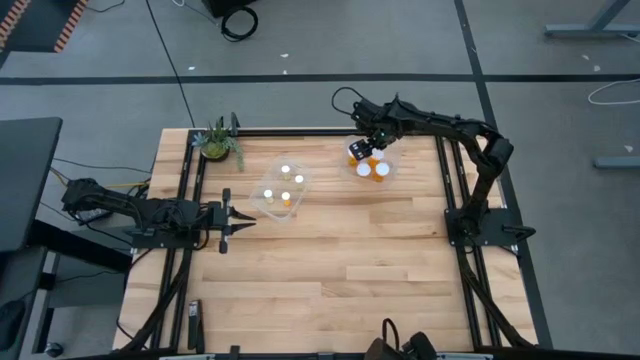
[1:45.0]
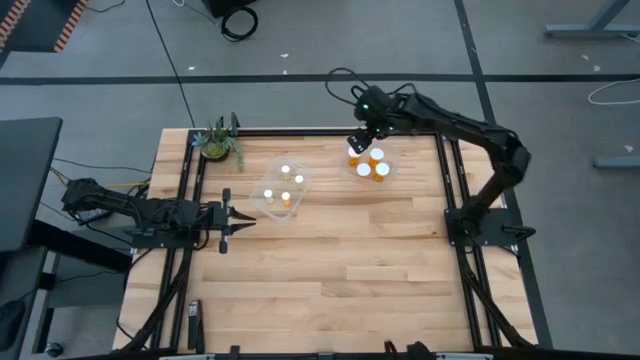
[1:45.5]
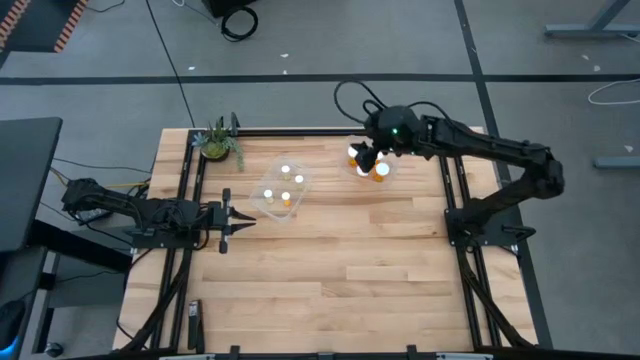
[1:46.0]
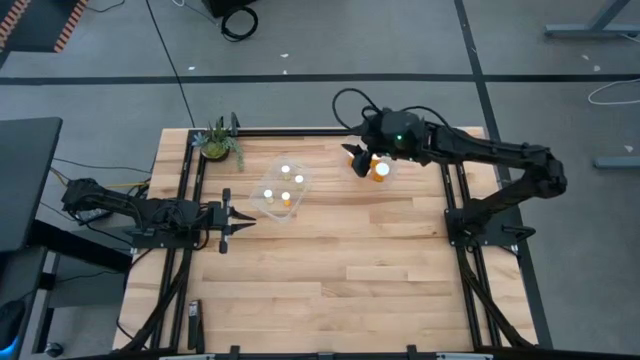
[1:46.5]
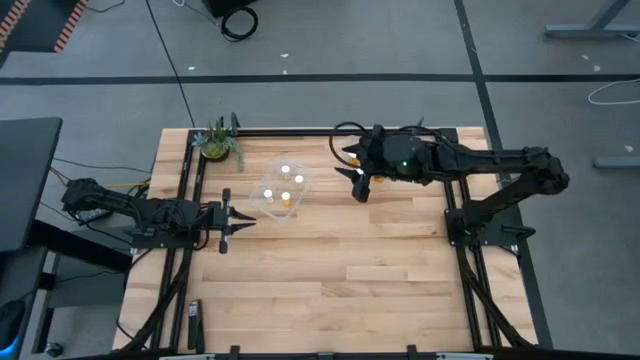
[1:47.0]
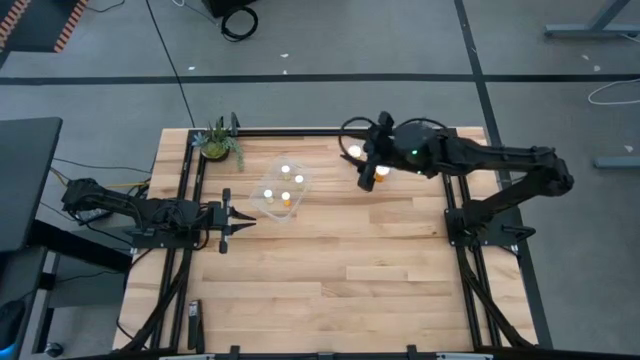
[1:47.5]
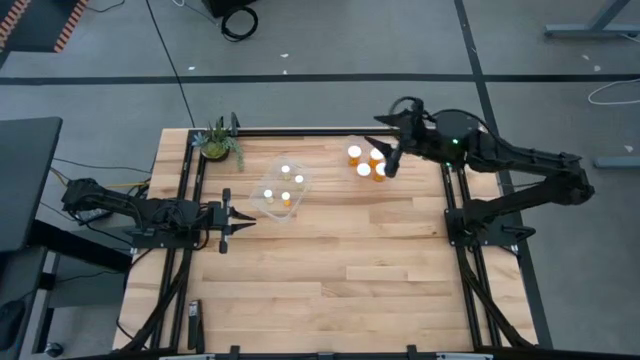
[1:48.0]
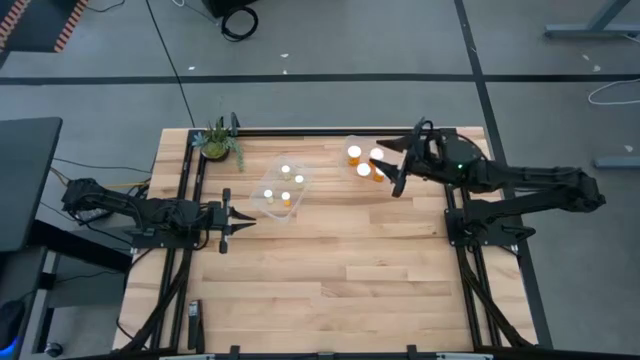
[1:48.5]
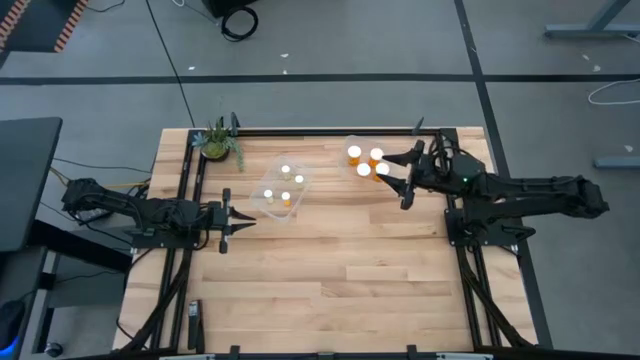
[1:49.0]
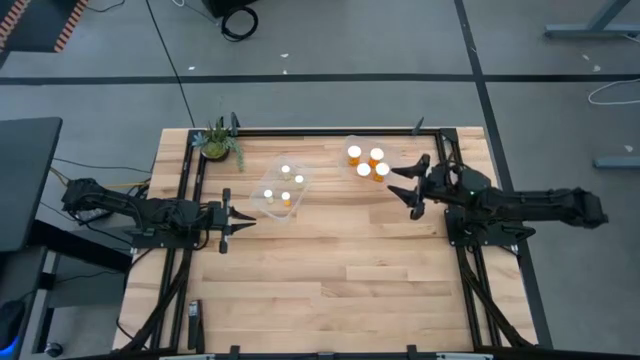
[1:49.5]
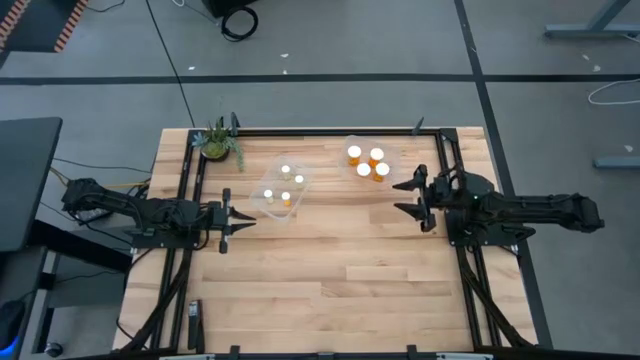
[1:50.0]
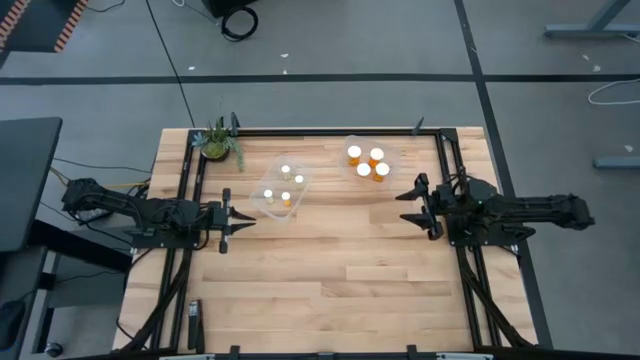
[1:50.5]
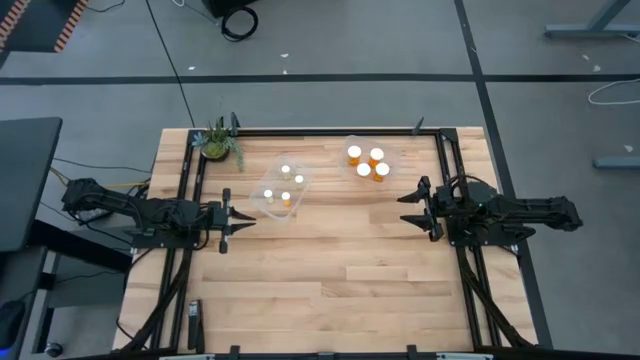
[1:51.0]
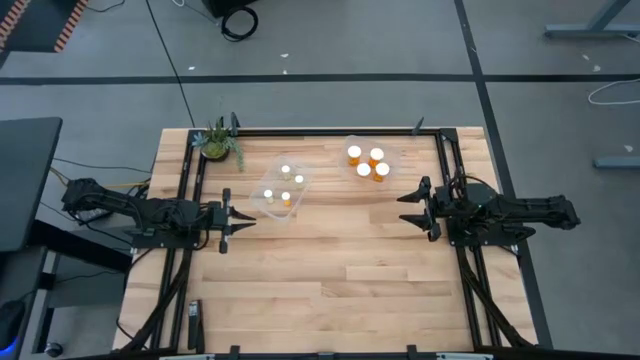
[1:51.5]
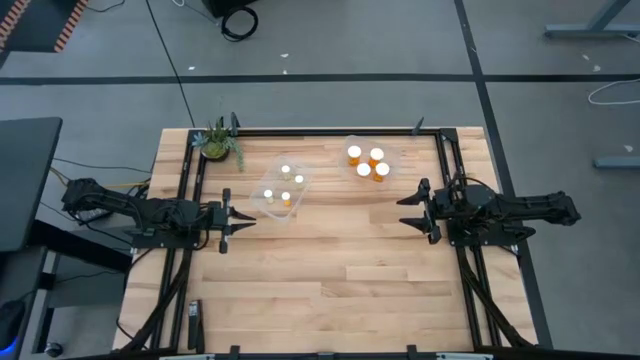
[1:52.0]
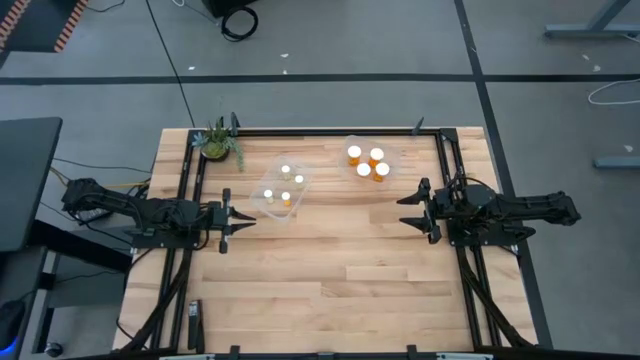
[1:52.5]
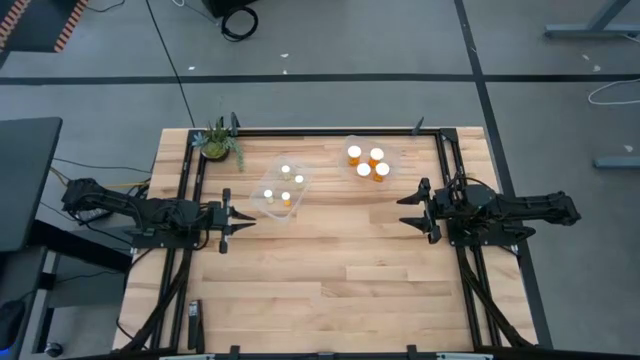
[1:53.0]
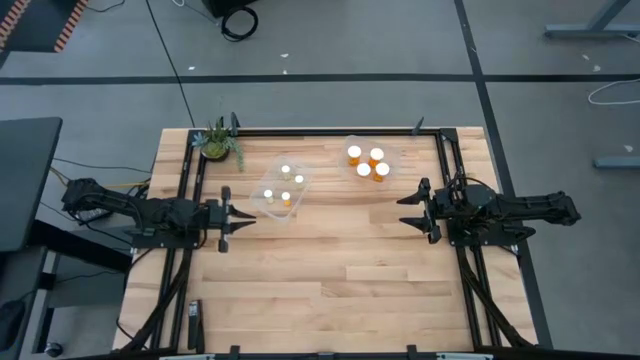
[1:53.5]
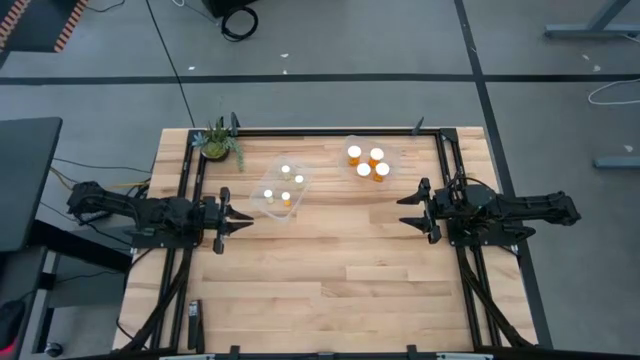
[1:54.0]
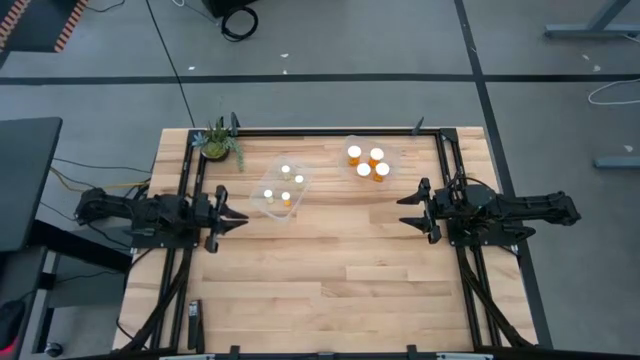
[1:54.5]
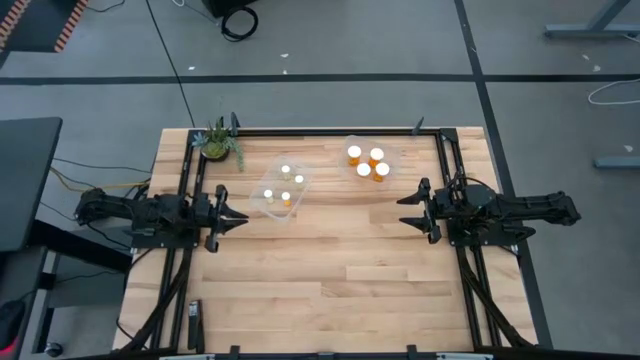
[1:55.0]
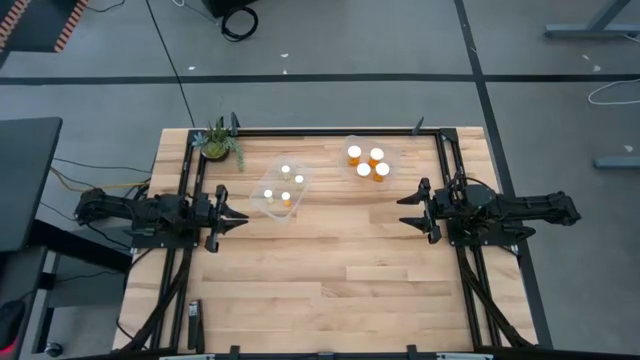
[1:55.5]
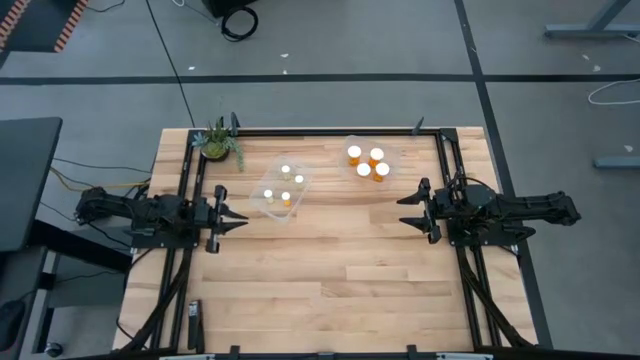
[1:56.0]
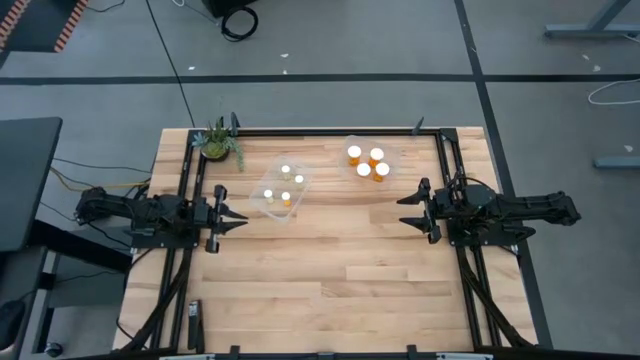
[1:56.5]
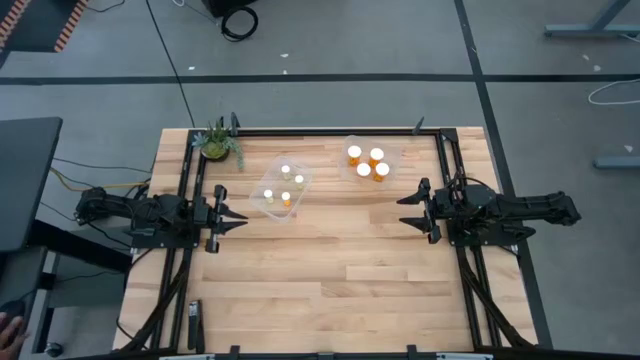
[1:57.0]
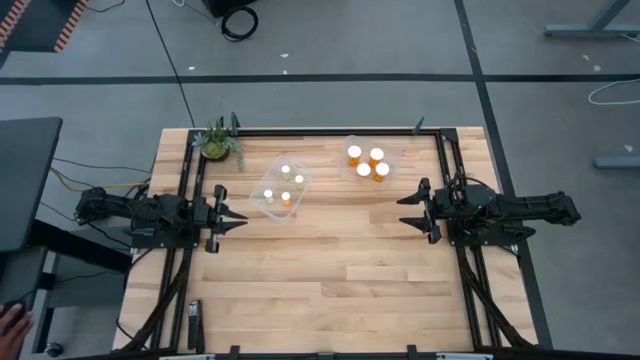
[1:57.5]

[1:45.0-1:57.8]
Task: Pick and place medicine bottles into bin by pill shape (circle, oval)
Return to Home Position

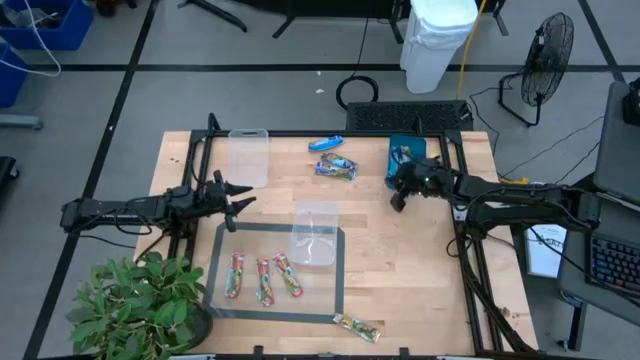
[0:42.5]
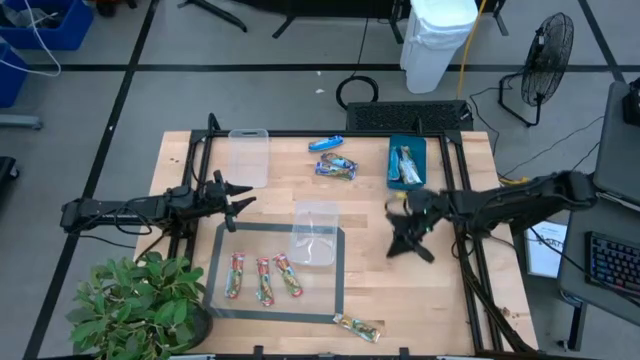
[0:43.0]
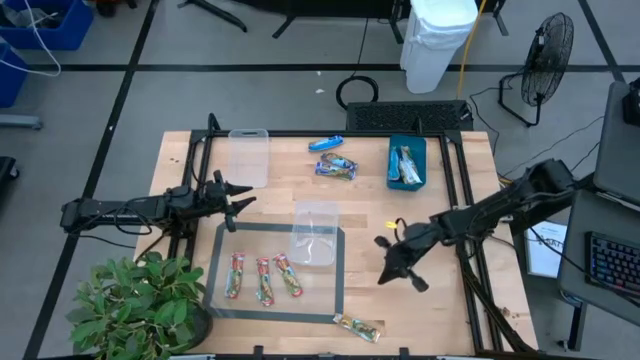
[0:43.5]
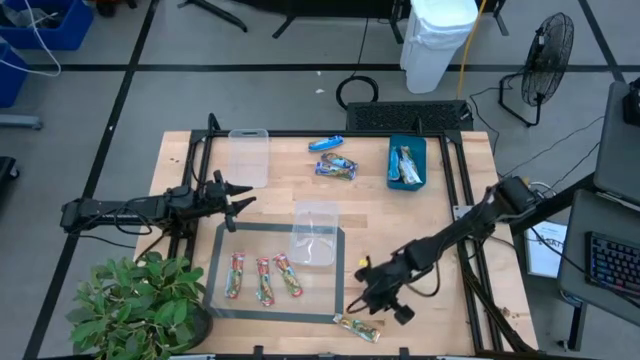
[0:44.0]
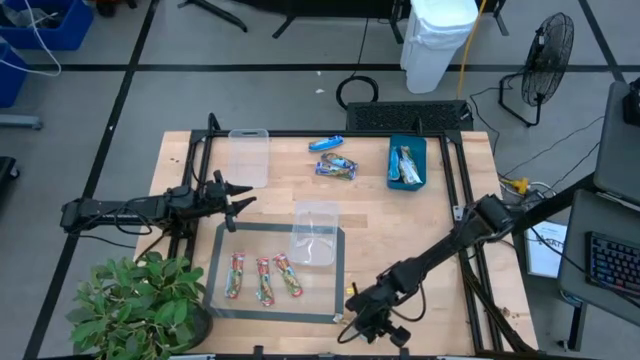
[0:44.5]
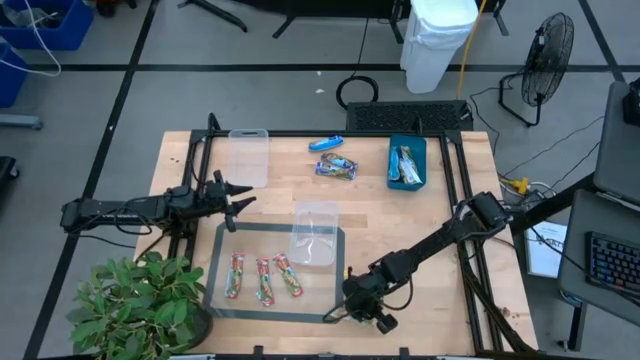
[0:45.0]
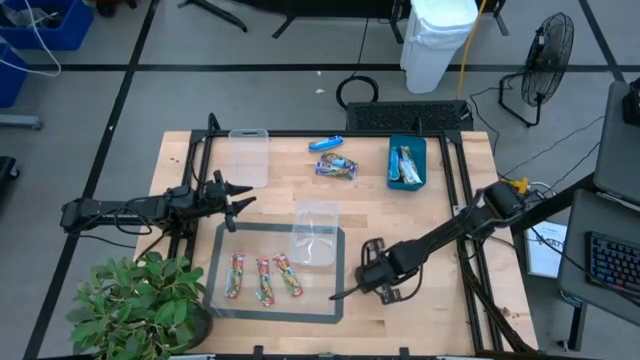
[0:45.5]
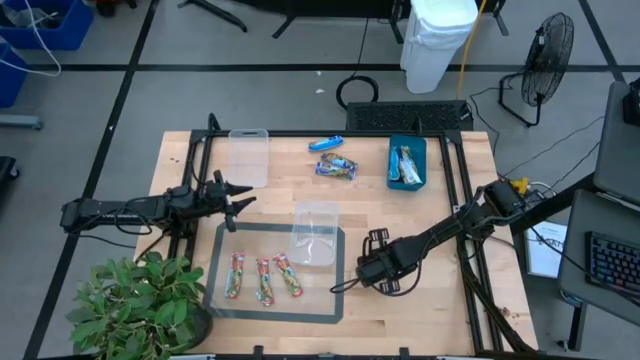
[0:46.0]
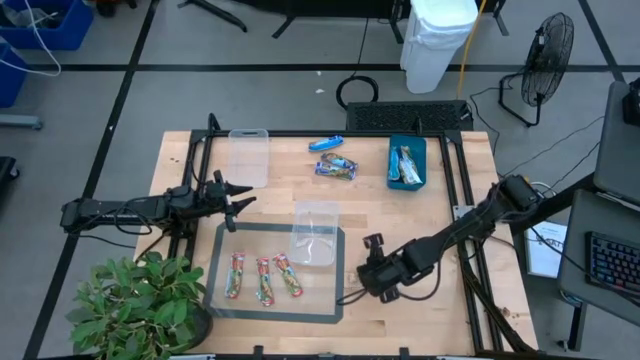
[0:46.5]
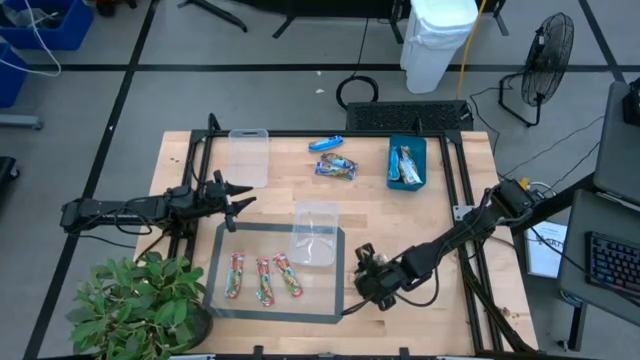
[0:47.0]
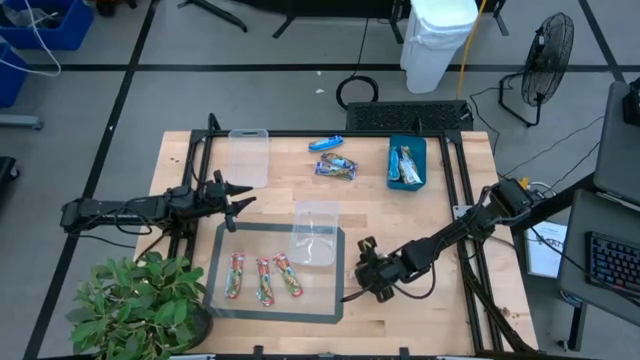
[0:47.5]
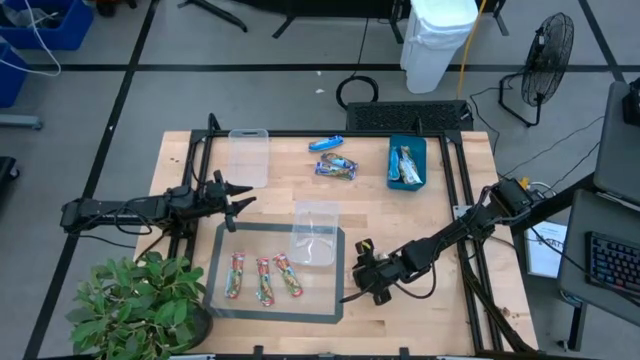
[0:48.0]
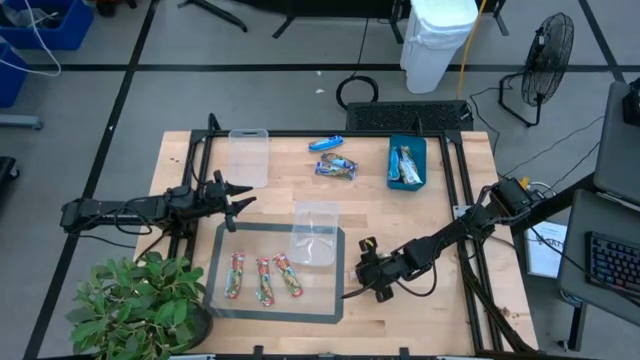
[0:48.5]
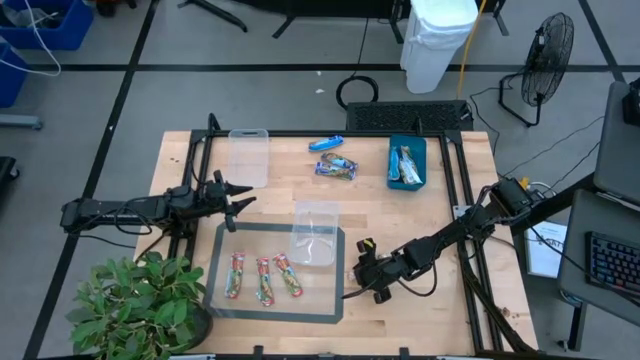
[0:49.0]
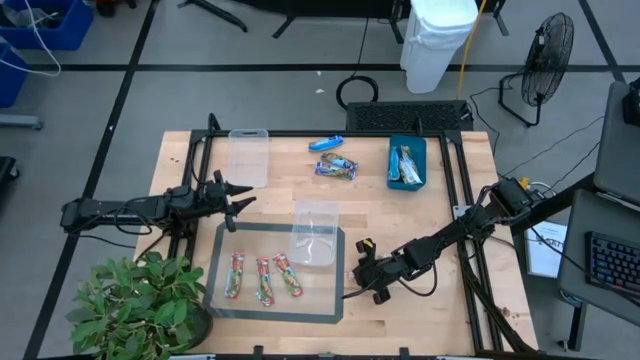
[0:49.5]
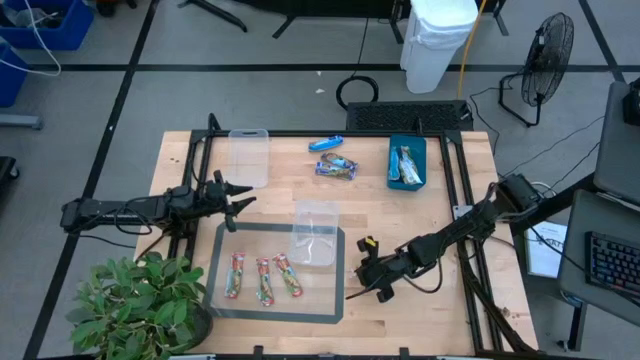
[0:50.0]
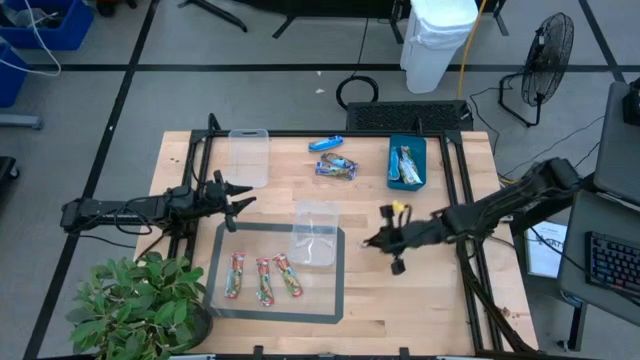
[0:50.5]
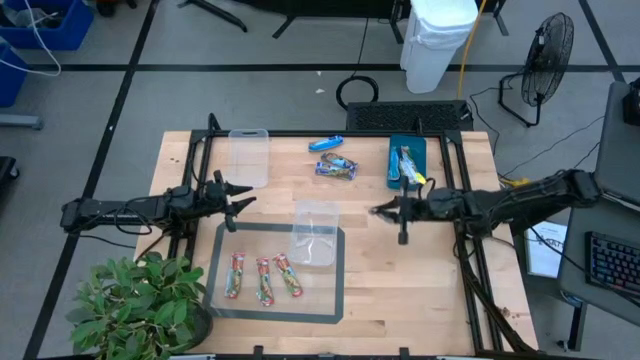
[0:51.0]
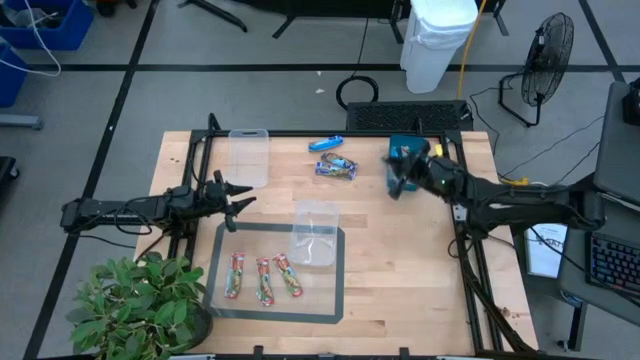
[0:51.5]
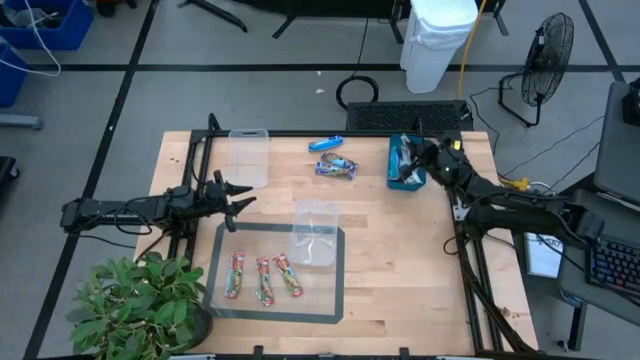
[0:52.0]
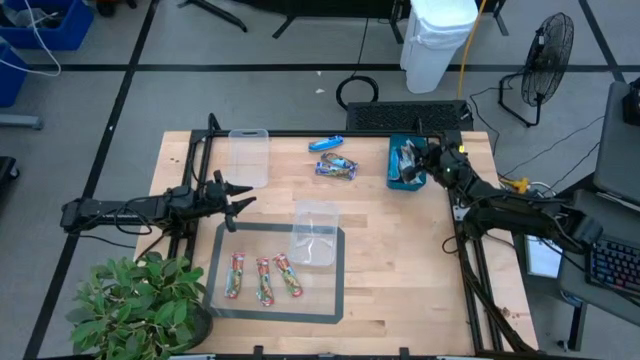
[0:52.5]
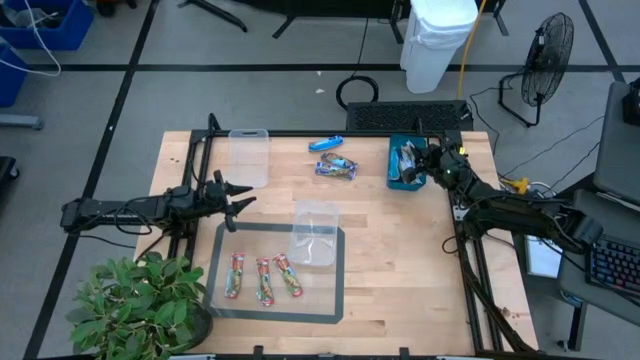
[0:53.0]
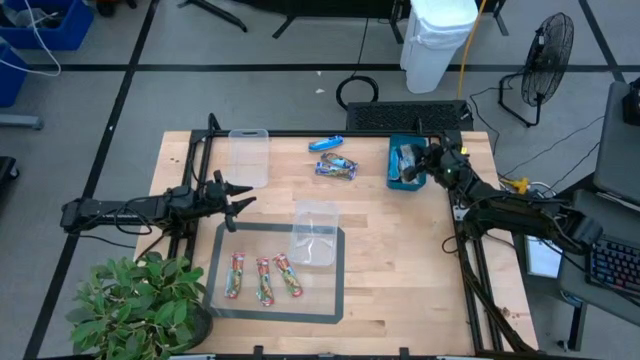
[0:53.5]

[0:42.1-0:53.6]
Task: Pick and place Granola Bars by type
Put the yellow granola bar into the blue bin
